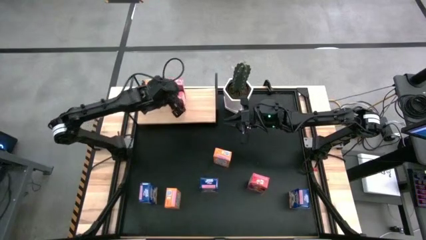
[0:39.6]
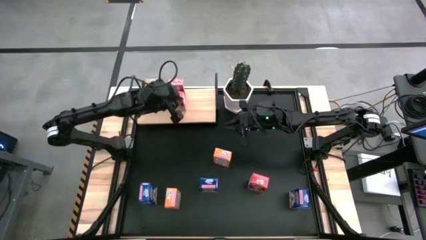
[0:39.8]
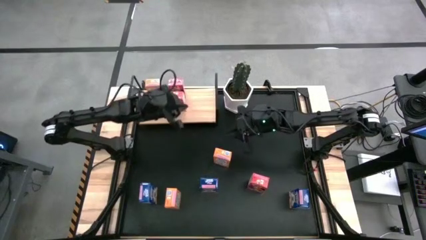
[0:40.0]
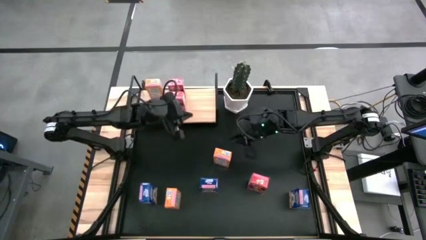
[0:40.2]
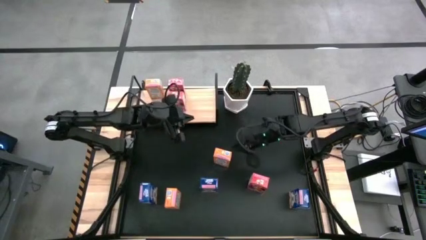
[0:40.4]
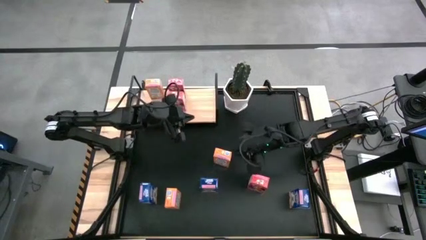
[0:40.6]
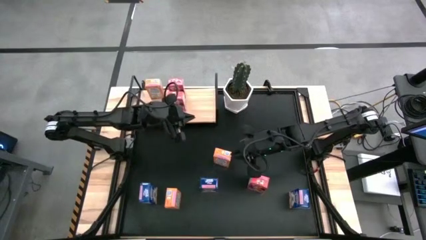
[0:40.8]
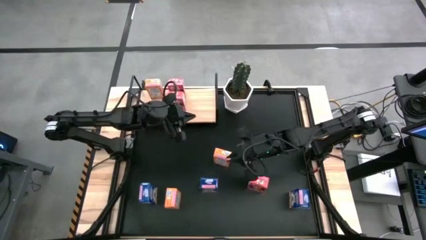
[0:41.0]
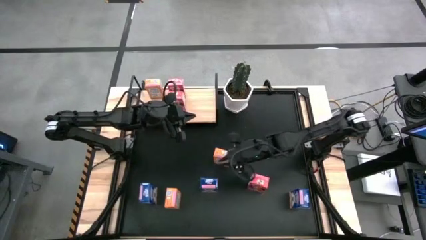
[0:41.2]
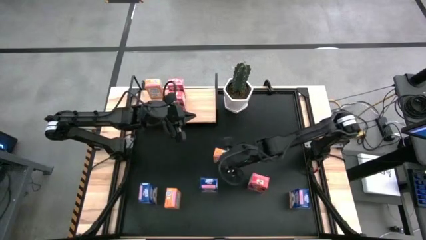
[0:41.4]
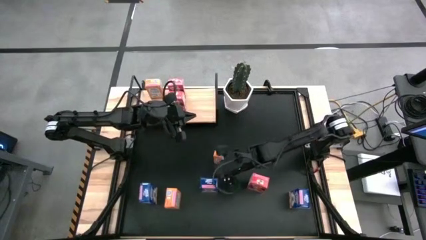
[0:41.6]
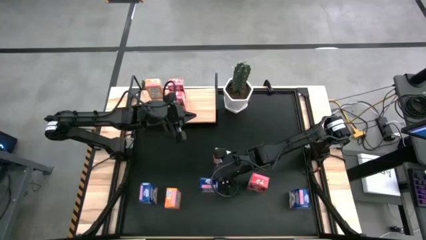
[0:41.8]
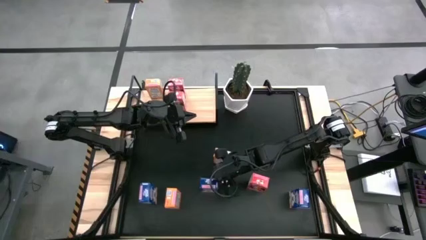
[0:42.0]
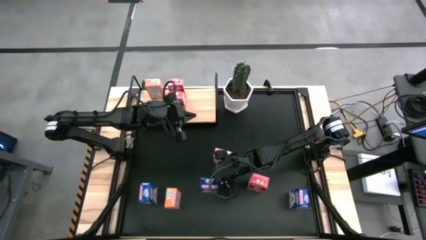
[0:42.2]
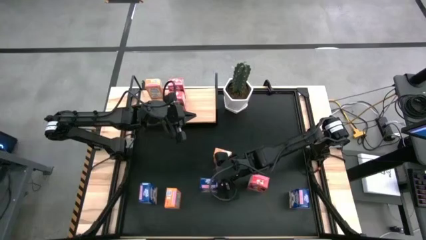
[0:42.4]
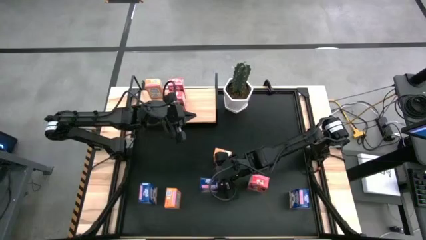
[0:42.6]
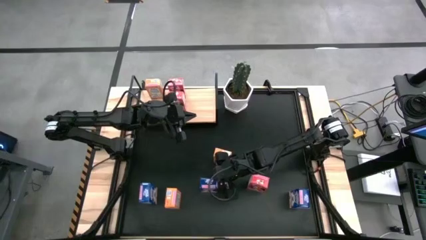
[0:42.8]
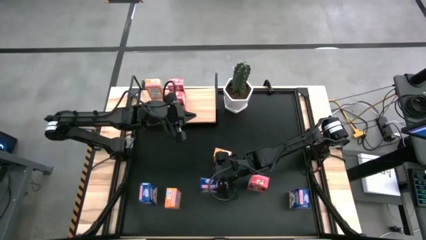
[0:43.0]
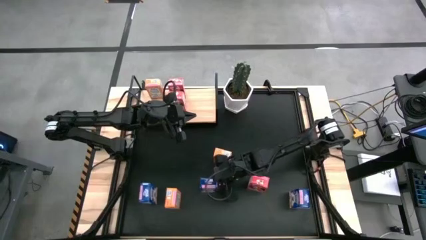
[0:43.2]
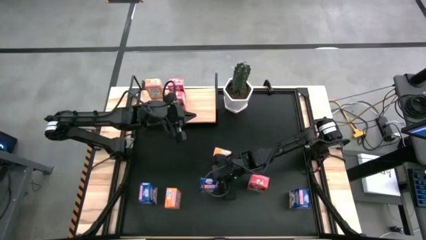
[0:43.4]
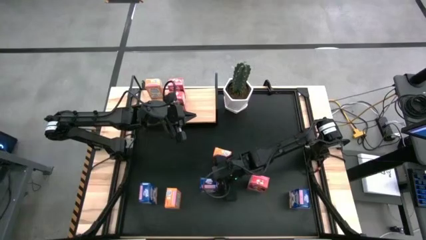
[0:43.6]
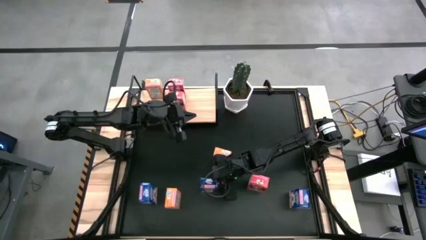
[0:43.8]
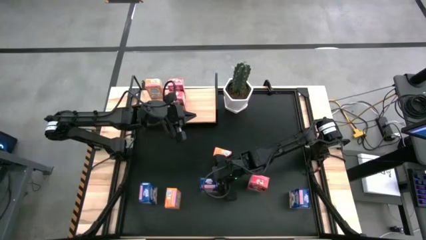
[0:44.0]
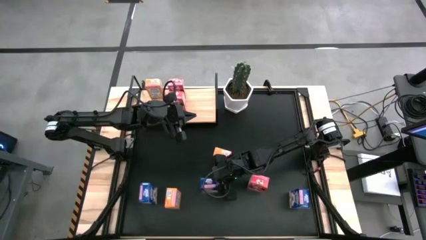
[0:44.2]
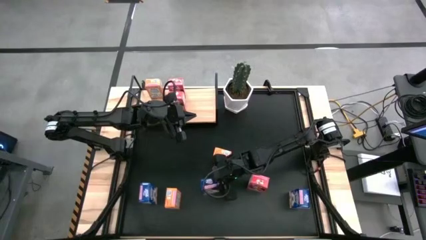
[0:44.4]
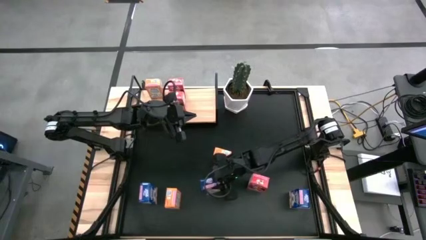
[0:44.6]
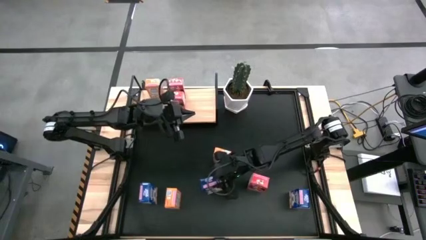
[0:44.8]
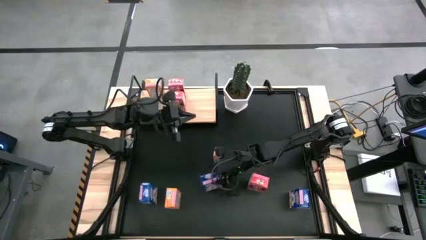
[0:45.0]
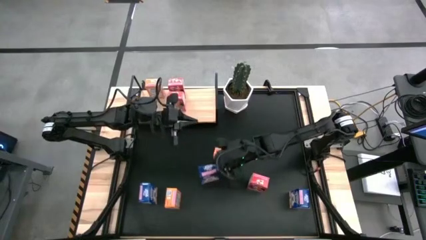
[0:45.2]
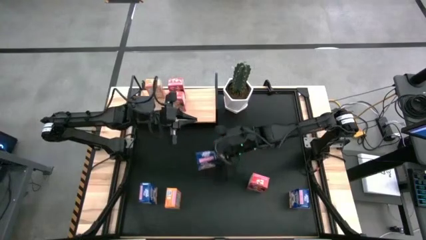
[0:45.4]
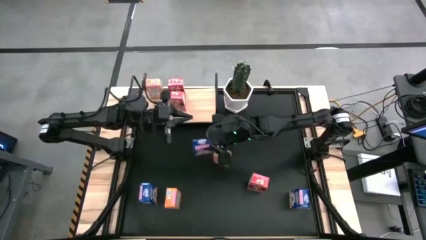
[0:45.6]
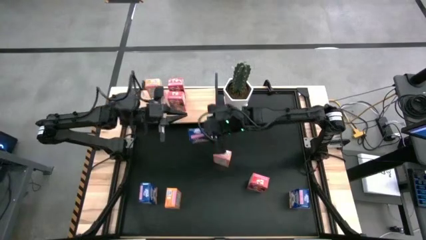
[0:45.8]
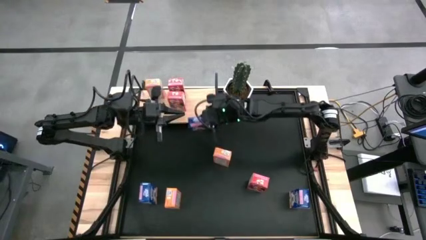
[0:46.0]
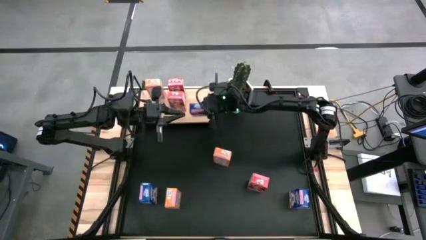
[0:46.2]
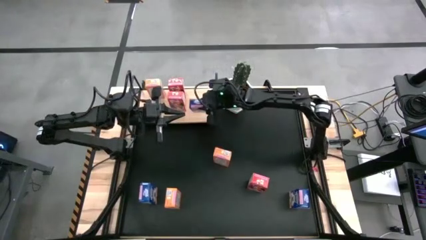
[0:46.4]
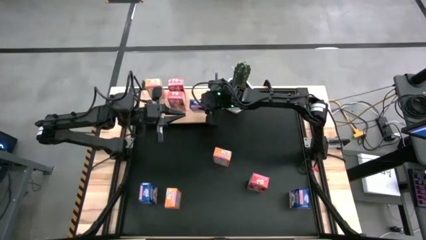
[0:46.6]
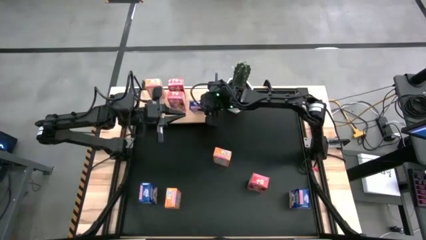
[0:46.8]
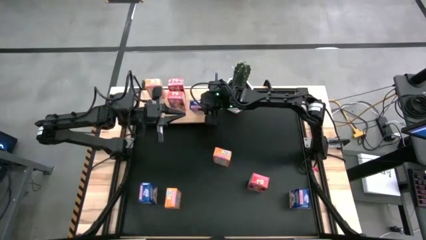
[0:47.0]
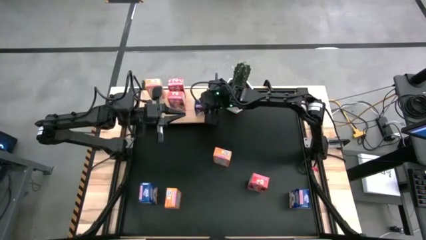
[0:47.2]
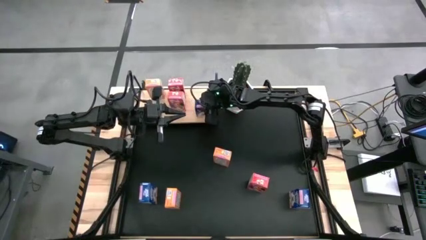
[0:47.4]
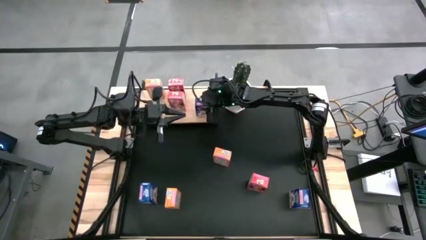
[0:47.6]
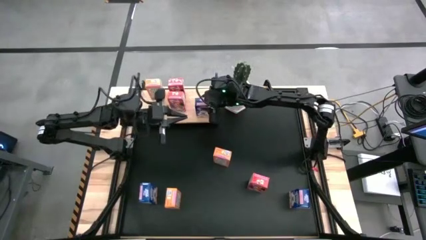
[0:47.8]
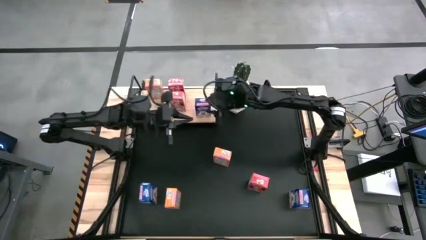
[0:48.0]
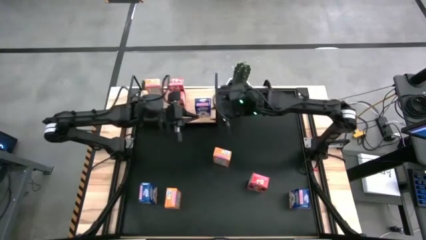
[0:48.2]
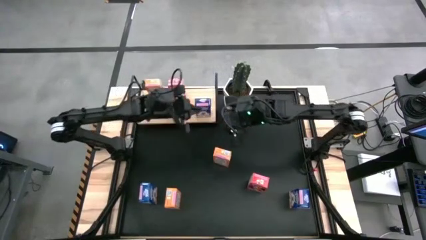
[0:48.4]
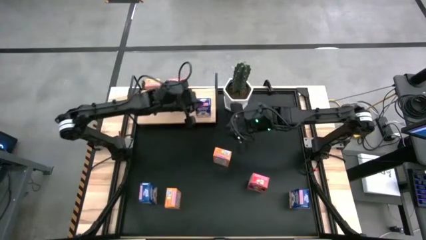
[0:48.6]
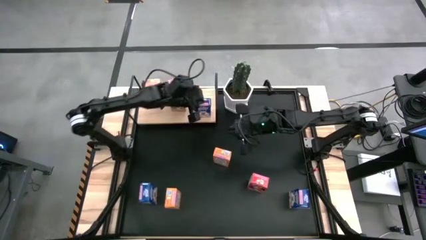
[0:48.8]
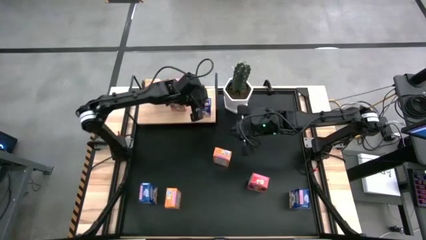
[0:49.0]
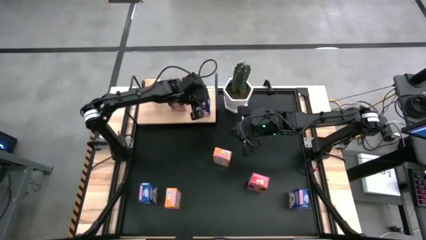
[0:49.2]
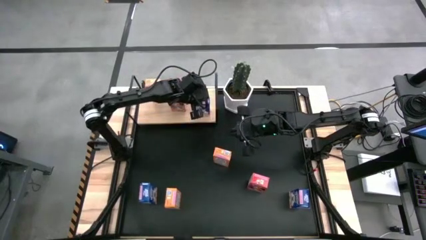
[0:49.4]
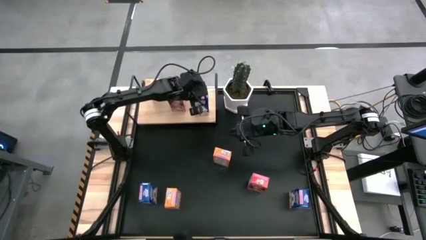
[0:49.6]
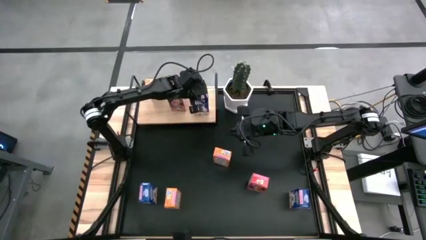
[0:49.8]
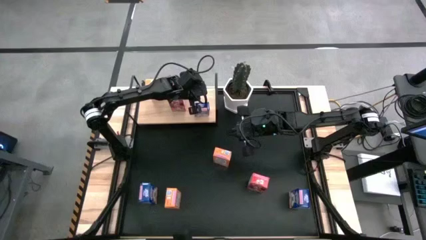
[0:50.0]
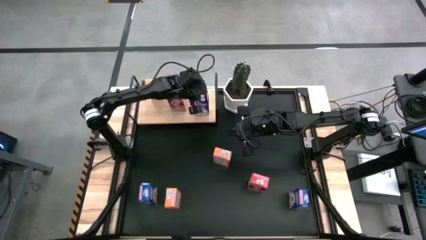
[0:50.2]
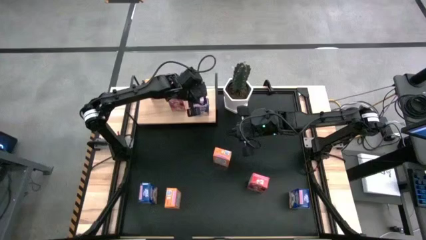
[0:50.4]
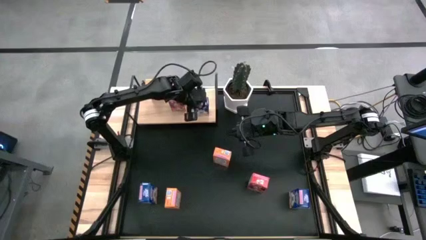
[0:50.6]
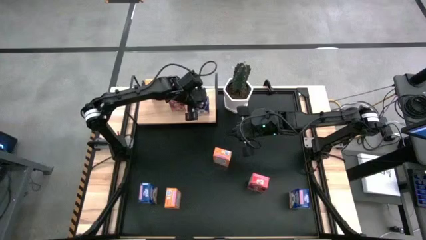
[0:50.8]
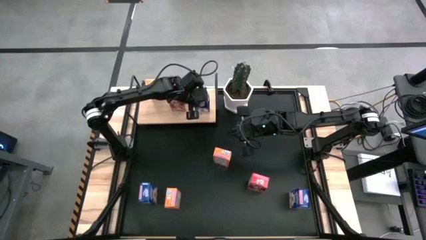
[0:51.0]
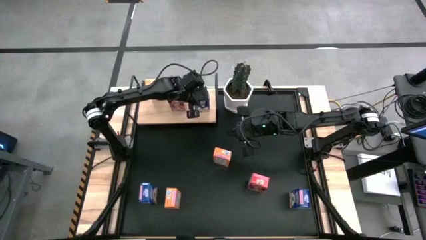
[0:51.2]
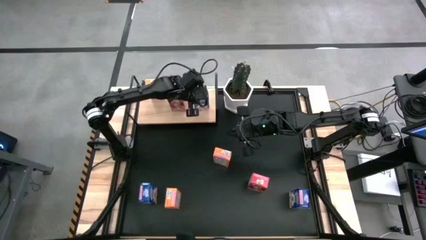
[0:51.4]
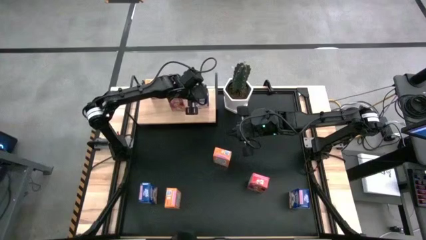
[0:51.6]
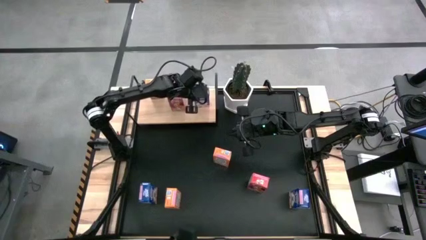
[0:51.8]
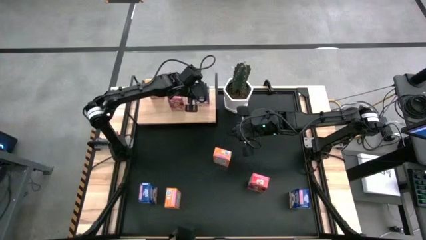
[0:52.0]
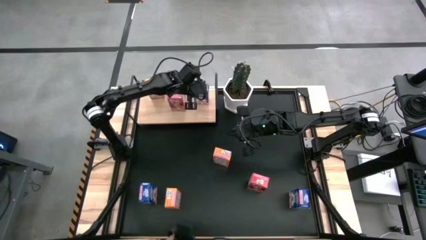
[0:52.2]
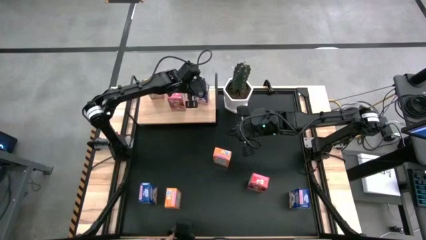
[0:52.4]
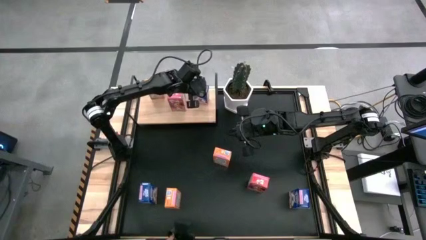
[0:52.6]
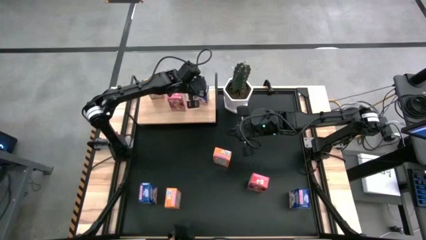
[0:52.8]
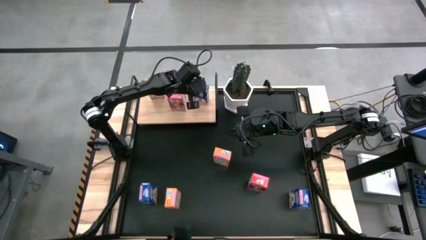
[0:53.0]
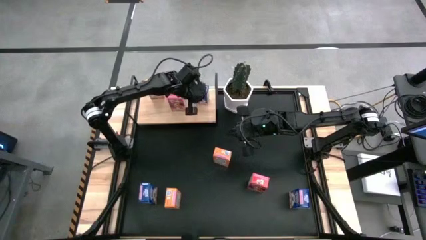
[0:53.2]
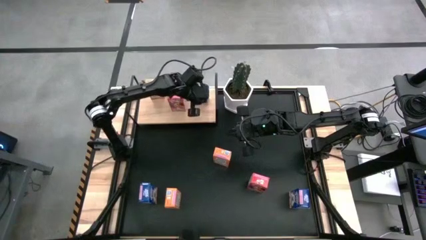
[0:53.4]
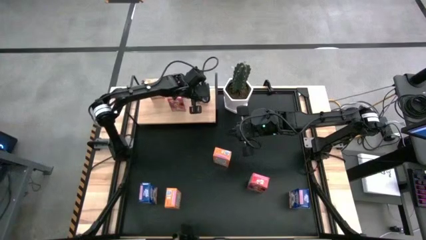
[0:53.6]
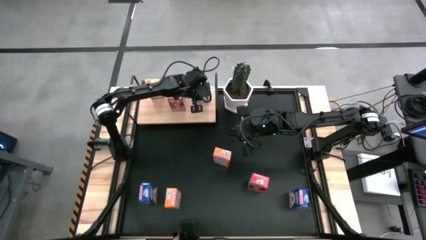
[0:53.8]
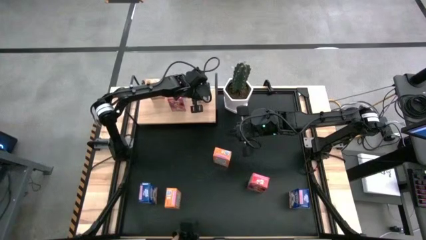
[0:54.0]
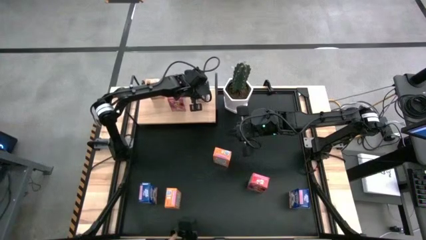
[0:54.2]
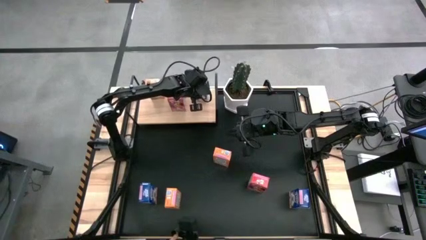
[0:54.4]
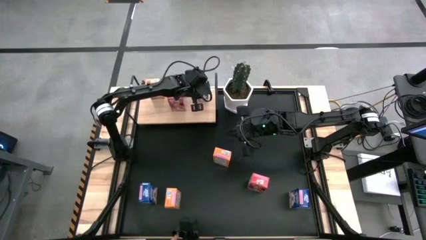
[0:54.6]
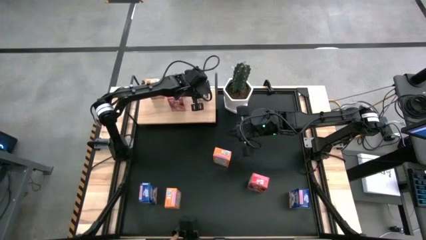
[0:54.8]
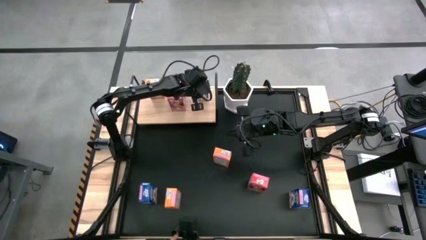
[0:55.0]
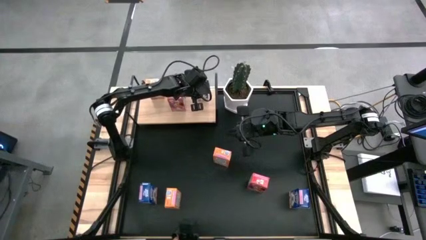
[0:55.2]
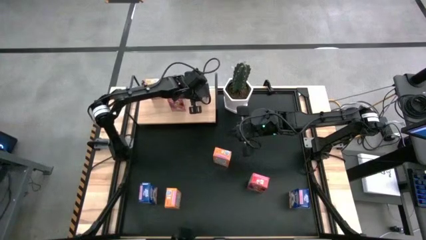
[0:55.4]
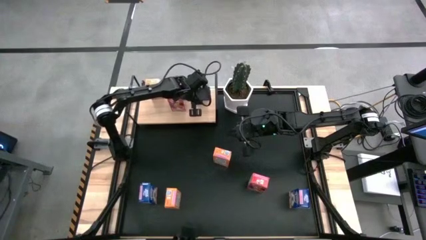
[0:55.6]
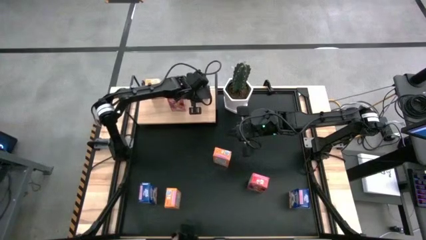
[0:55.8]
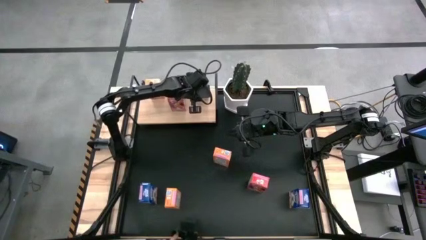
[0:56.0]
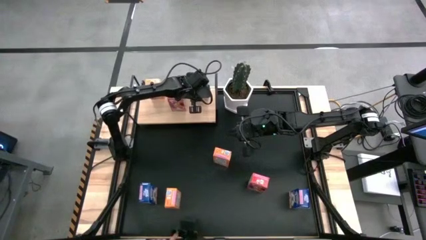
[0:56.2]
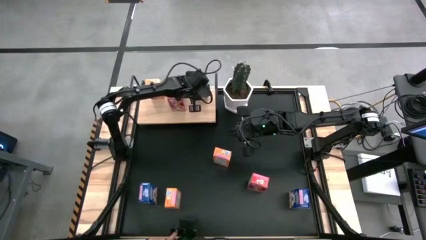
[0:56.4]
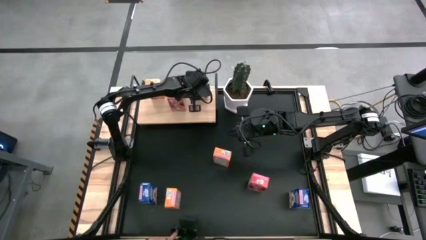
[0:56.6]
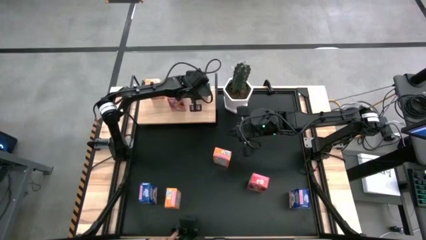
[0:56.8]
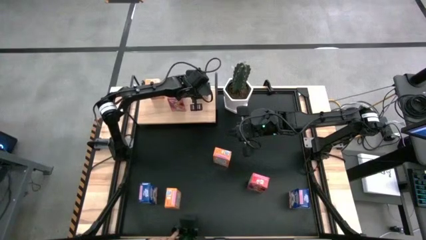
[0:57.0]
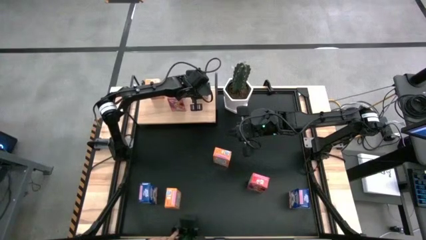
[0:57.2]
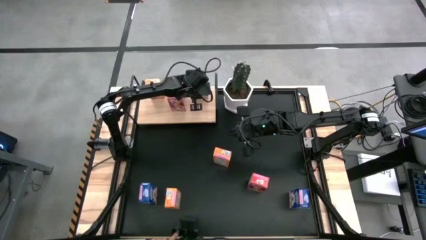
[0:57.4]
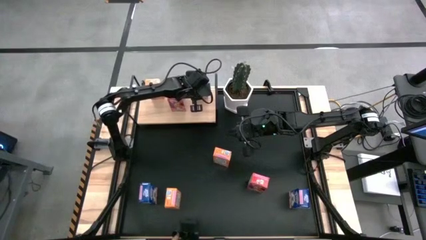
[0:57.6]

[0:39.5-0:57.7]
Task: Stack cereal on shelf
Put the middle blue cereal box on the shelf
